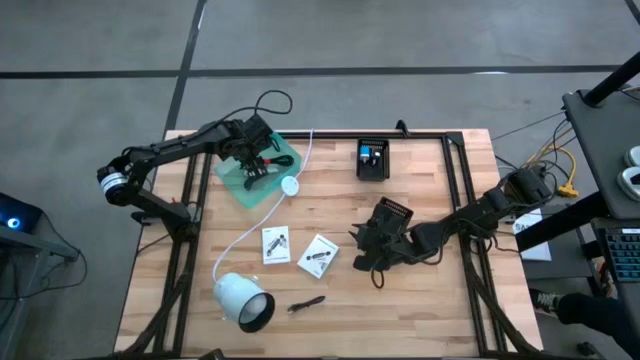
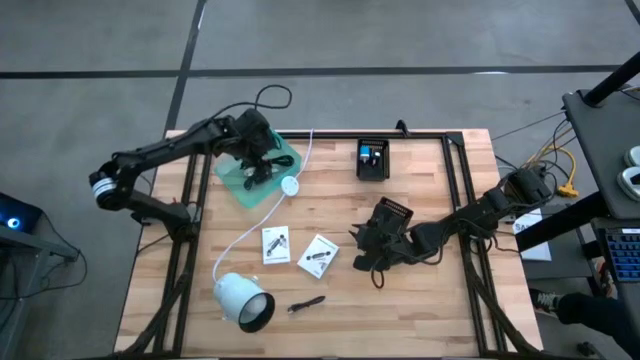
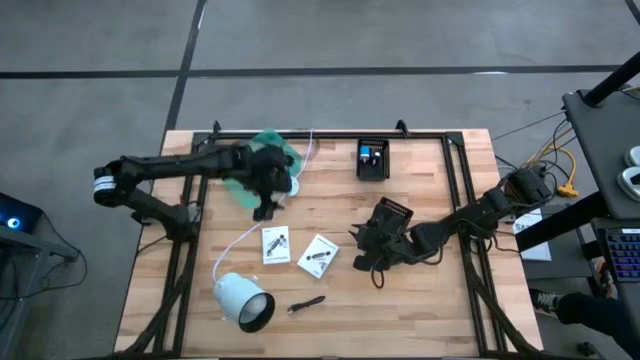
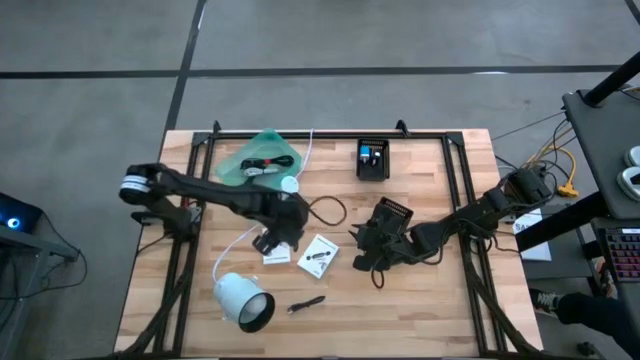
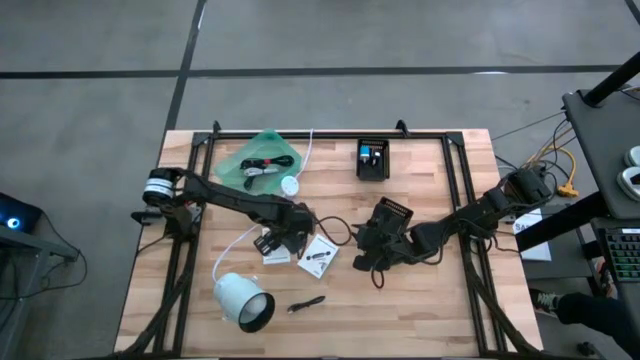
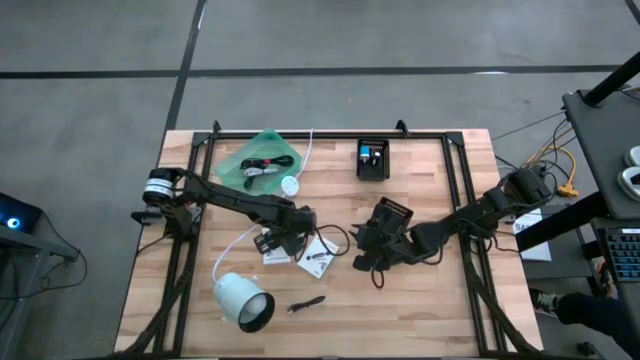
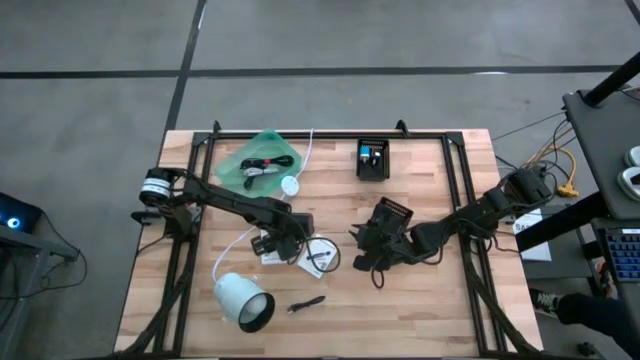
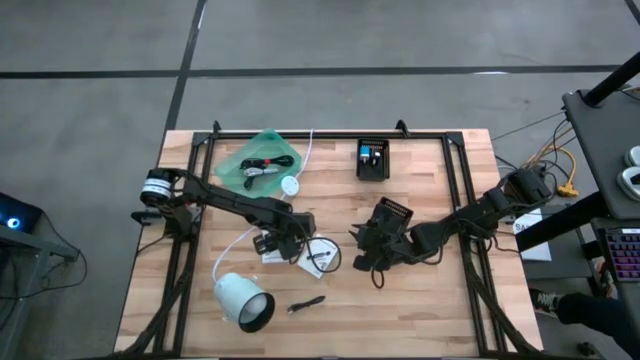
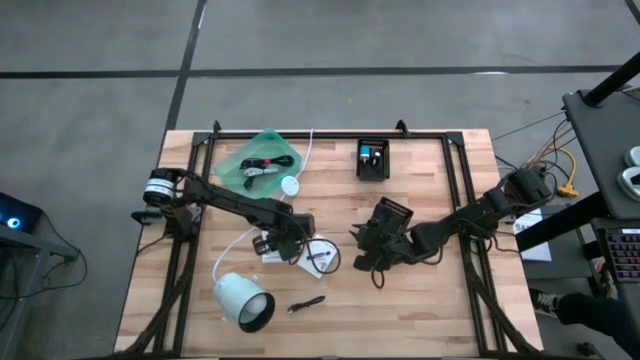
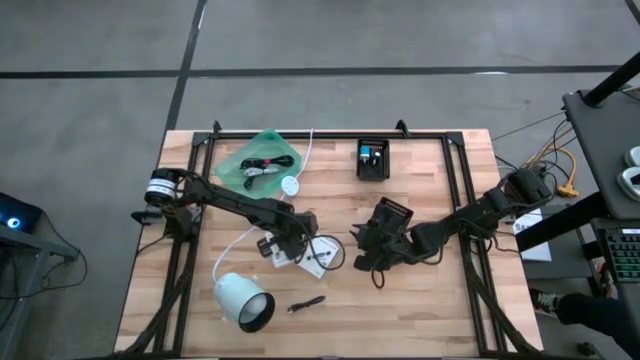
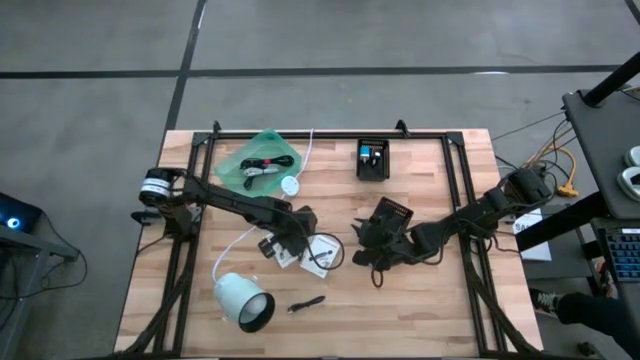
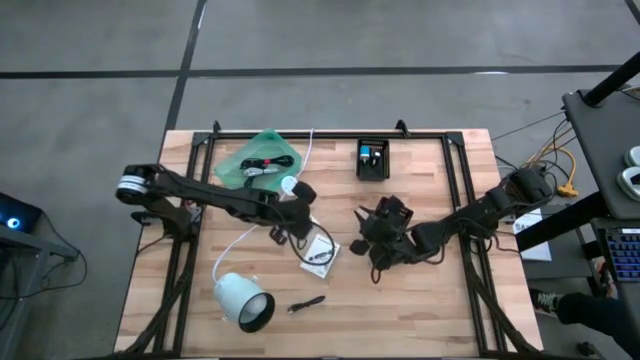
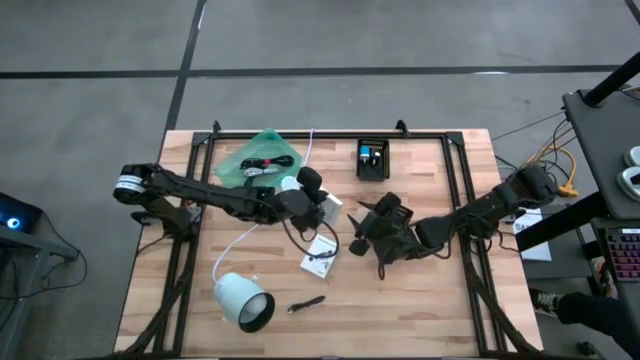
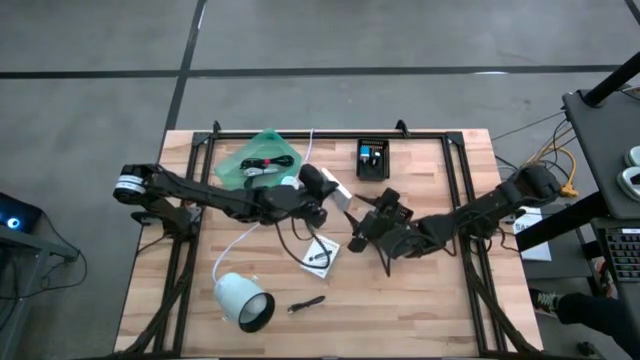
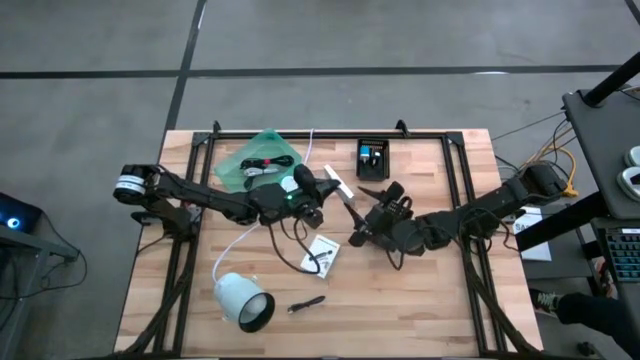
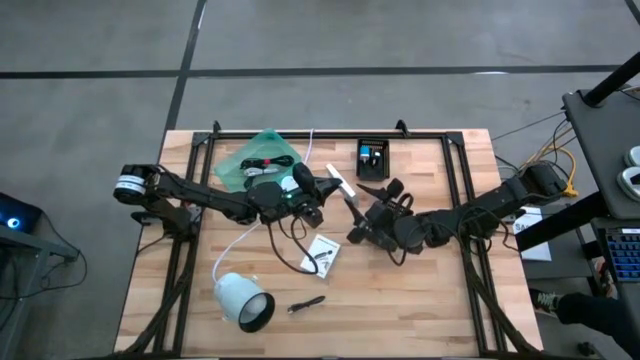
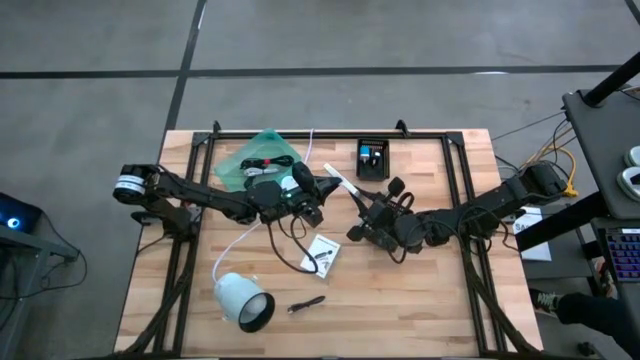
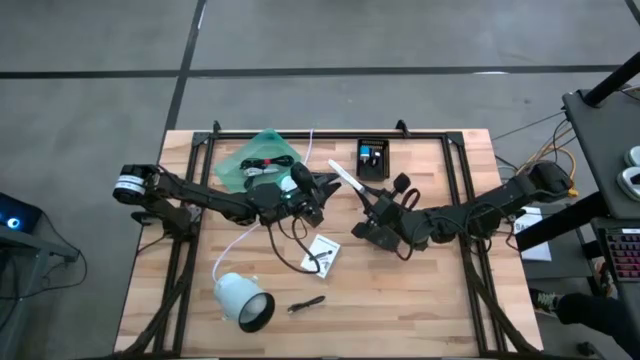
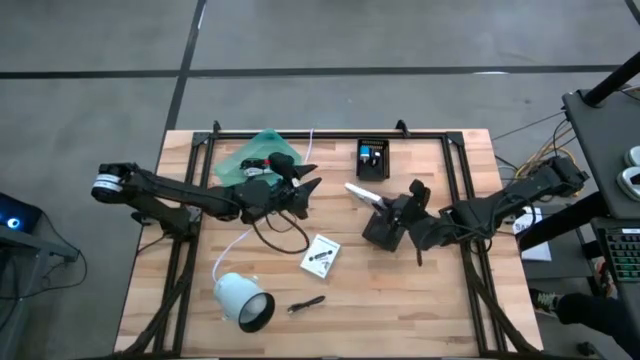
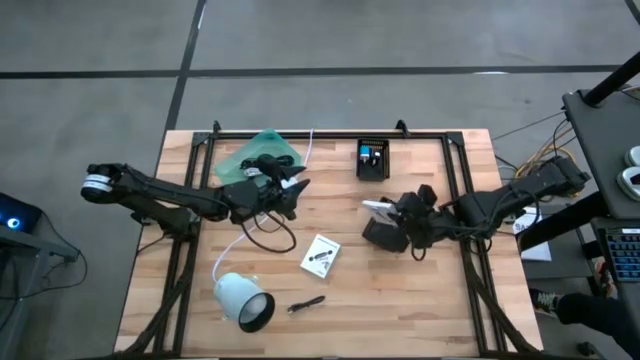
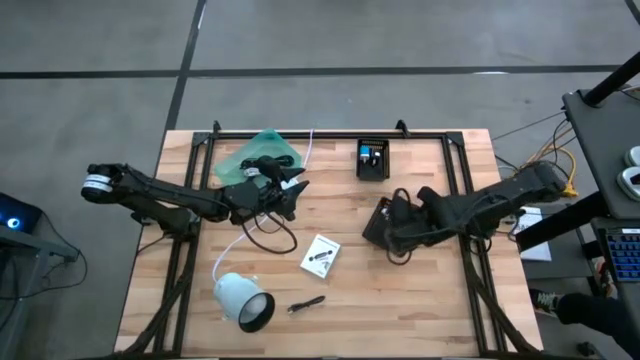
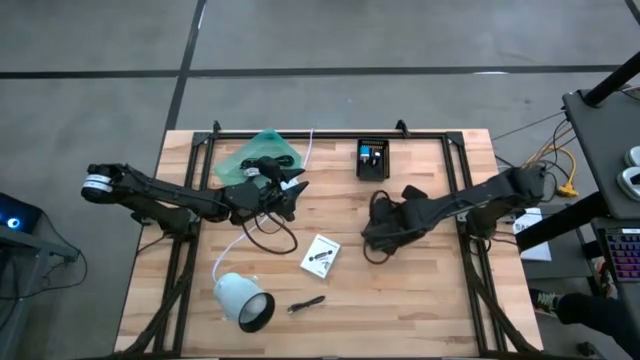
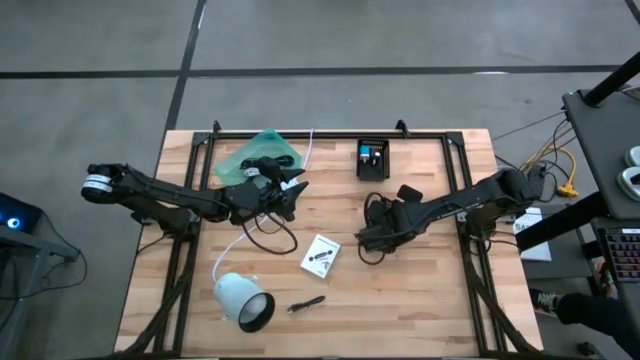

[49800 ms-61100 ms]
Task: Pick and place items into bin
Put the left white card reader box into the bottom black bin

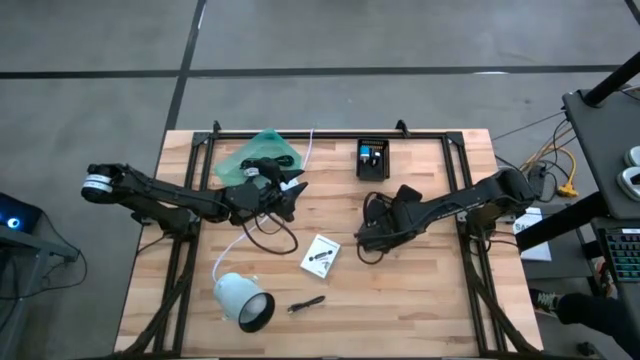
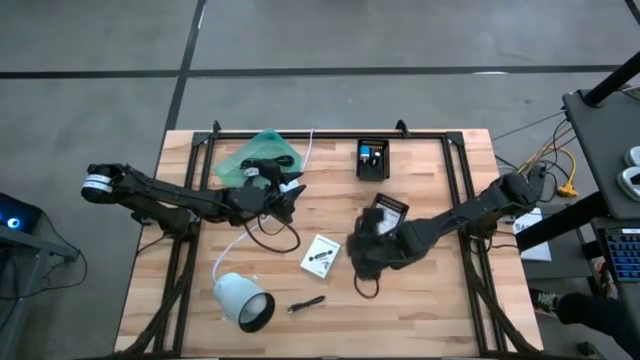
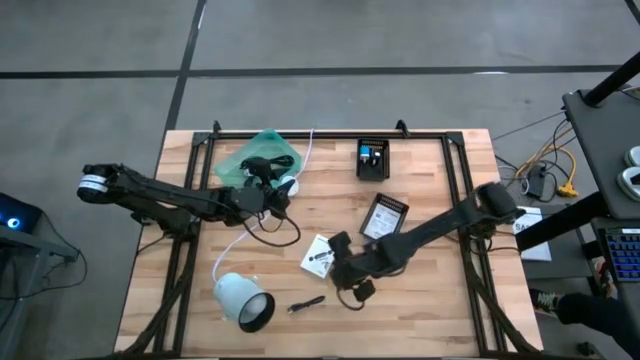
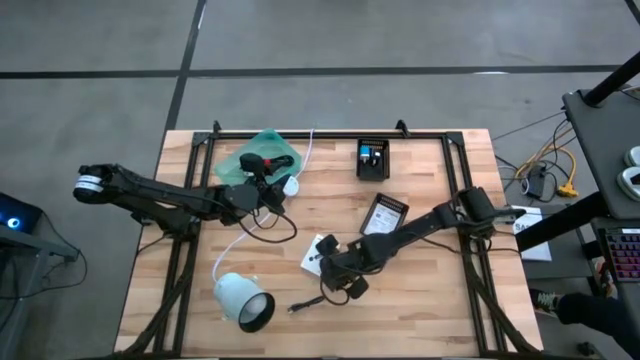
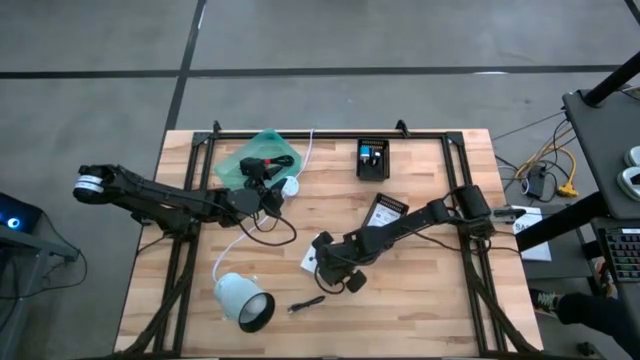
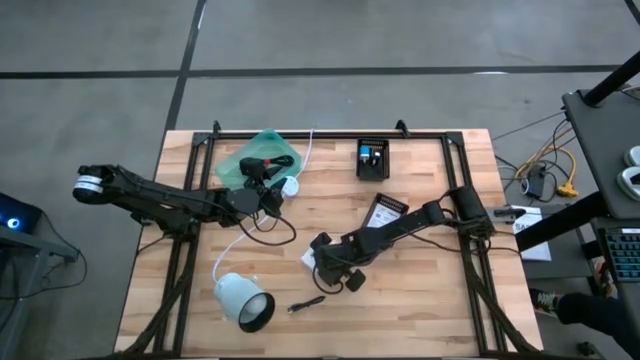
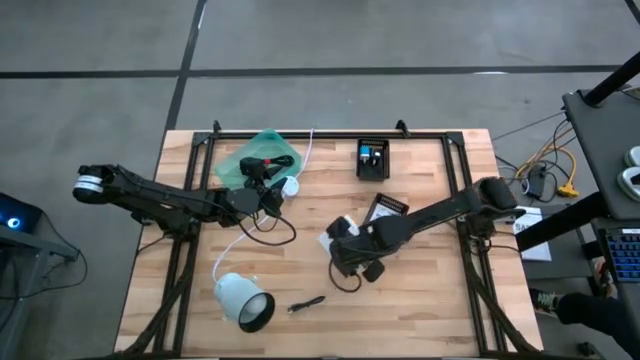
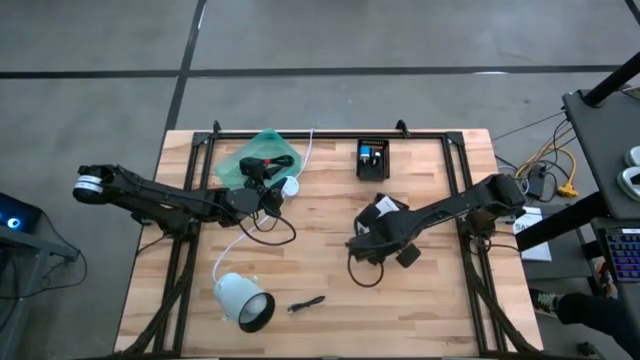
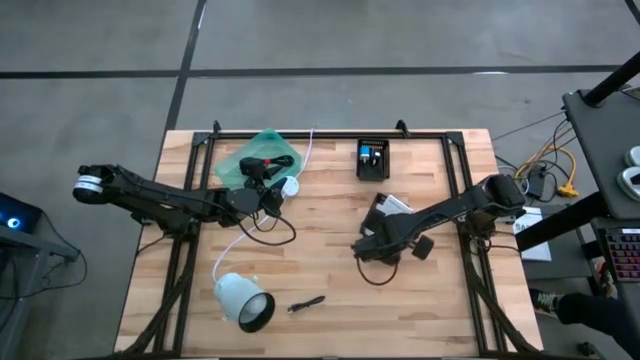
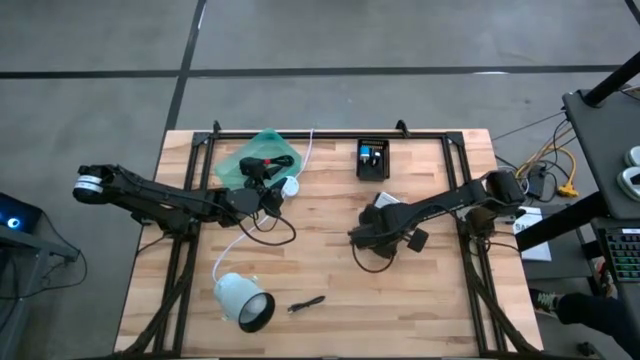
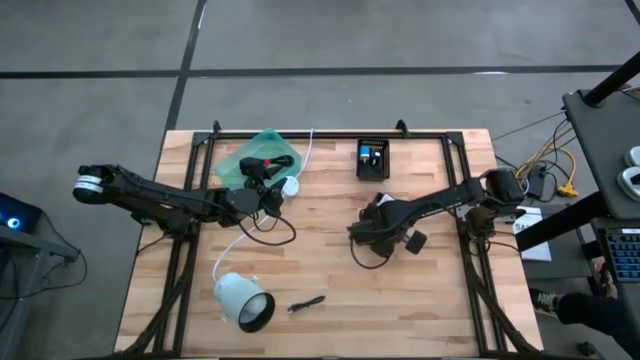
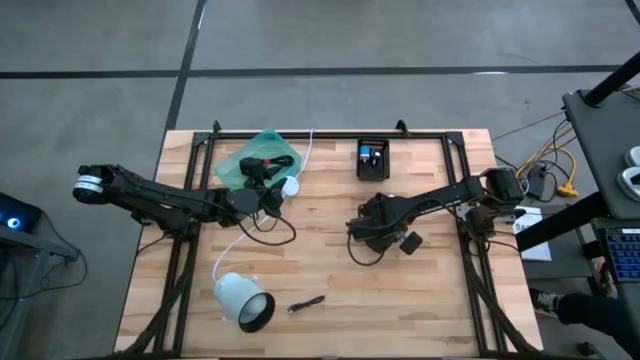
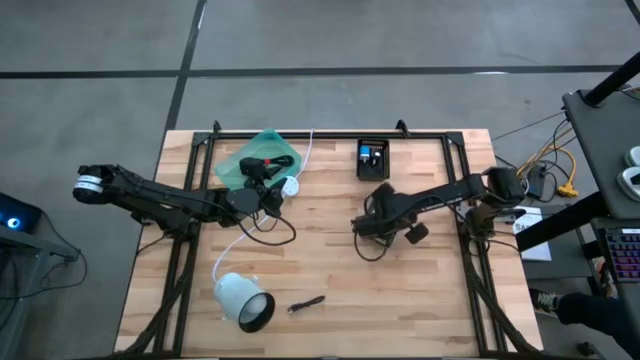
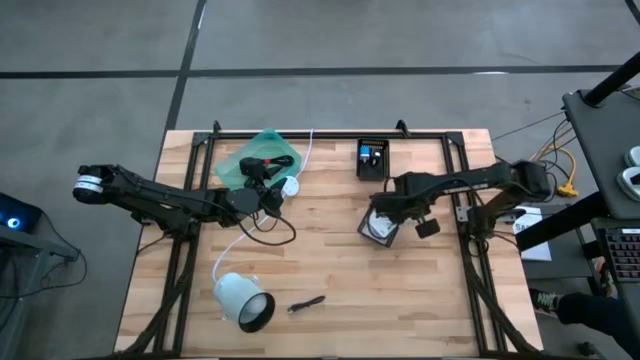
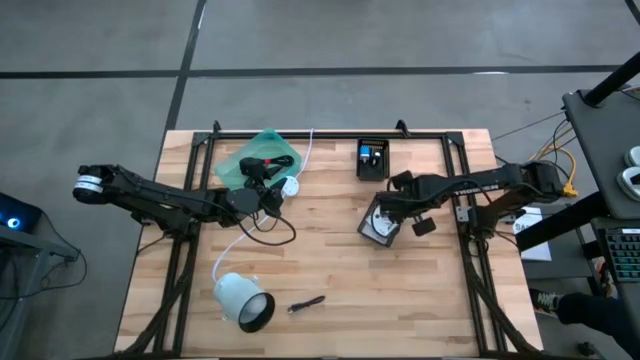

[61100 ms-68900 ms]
Put the white card reader box into the bottom black bin

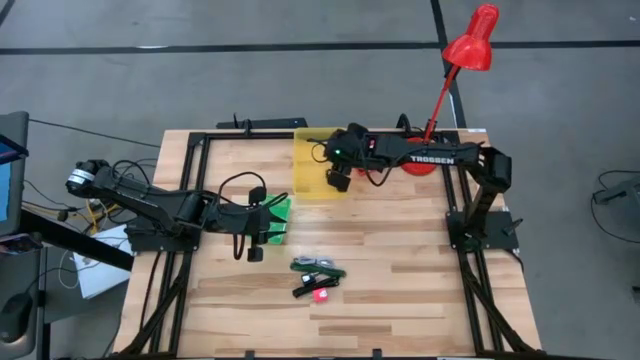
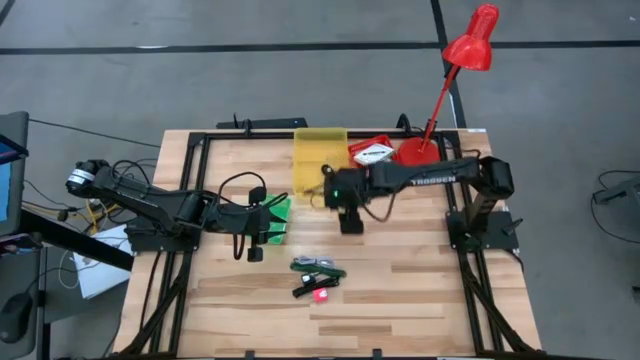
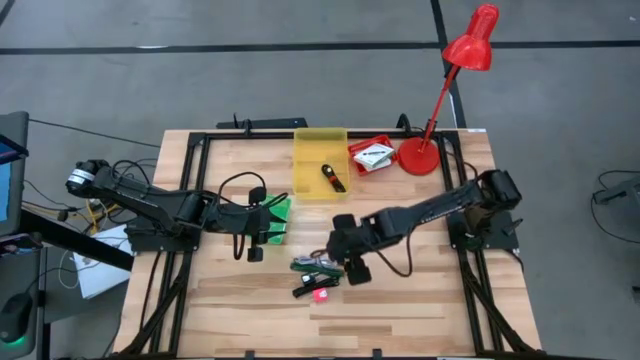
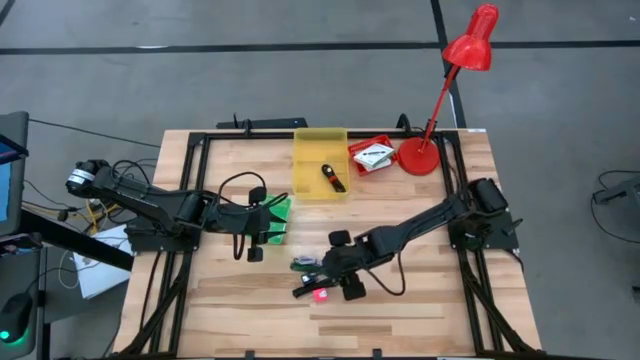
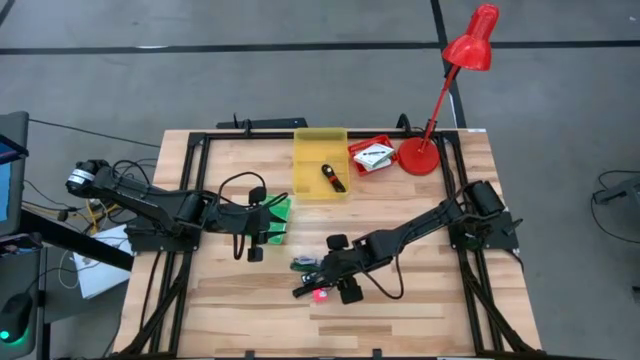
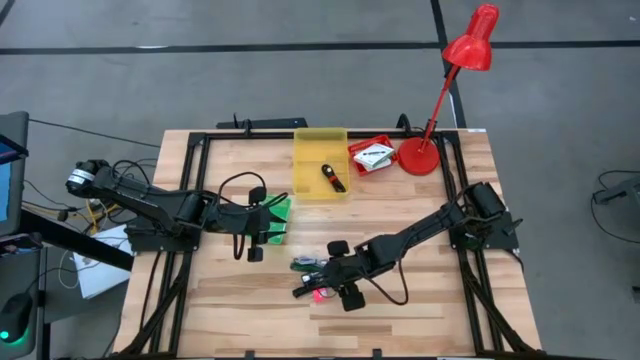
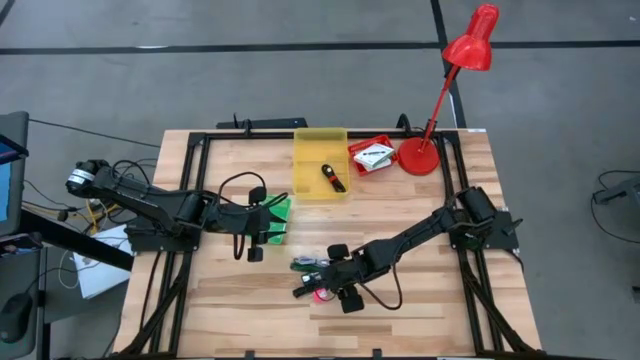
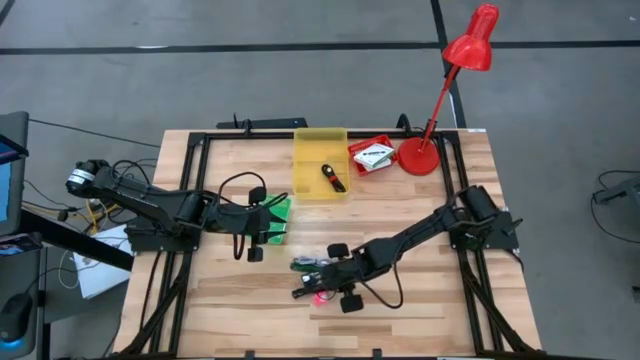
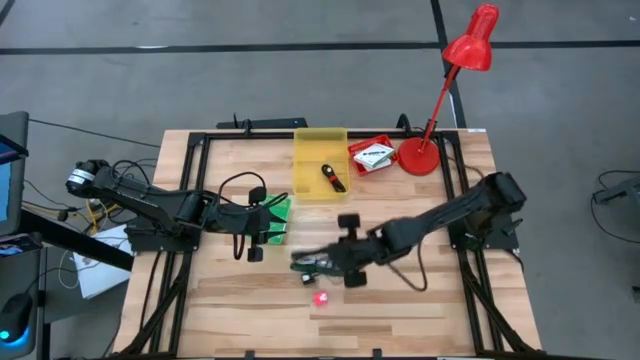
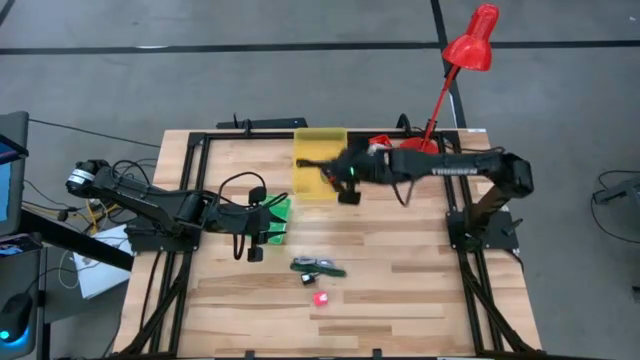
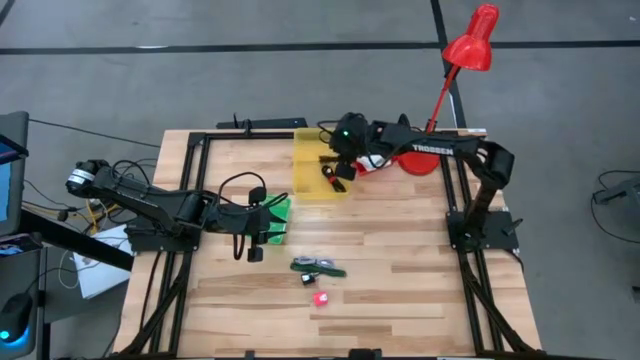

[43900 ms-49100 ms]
Task: Pick and place items into bin
Put the black charger cable into the yellow bin
